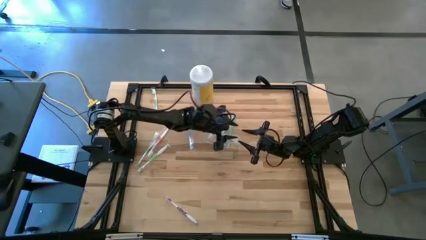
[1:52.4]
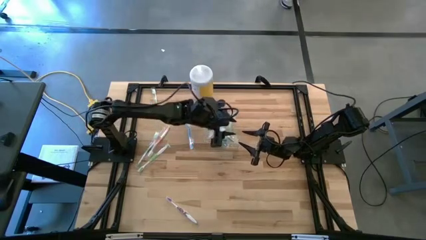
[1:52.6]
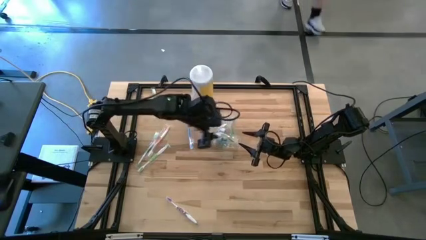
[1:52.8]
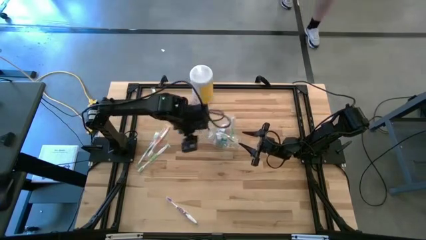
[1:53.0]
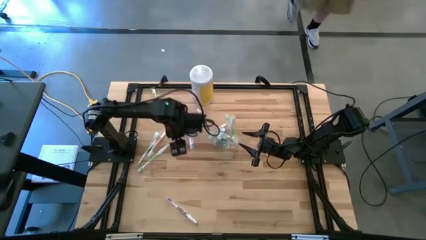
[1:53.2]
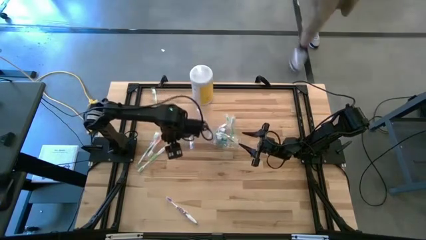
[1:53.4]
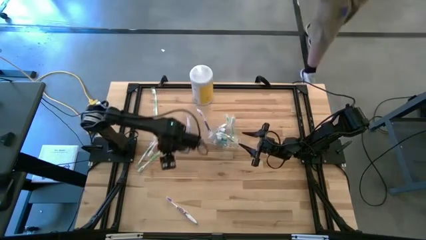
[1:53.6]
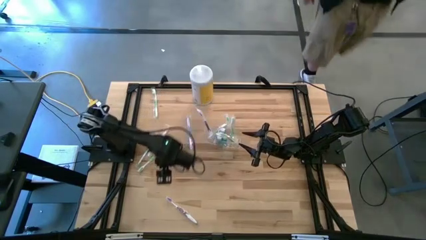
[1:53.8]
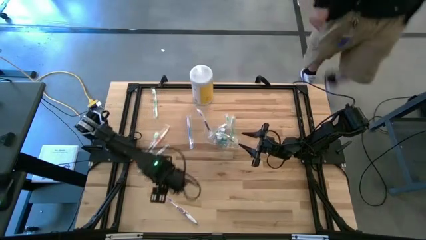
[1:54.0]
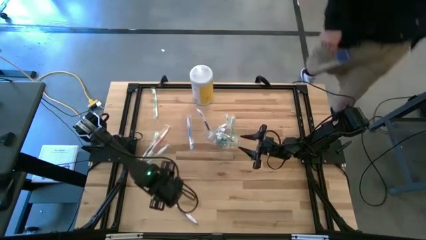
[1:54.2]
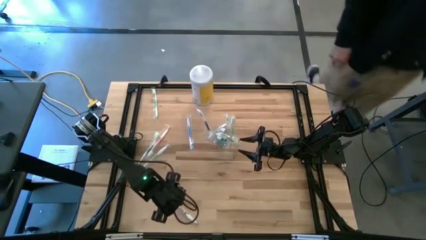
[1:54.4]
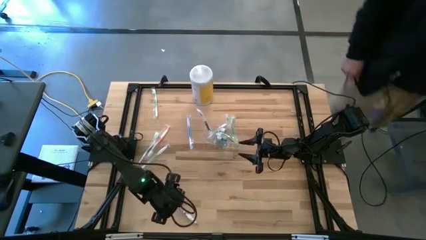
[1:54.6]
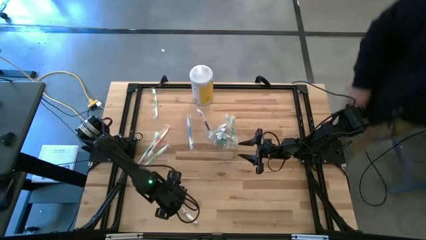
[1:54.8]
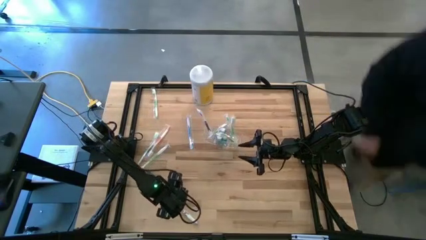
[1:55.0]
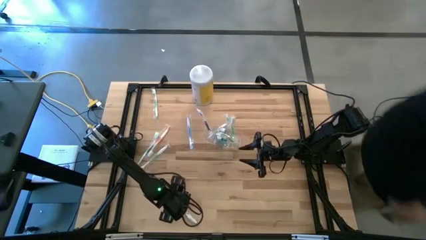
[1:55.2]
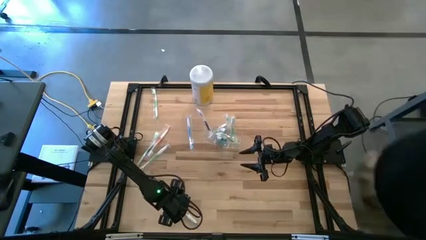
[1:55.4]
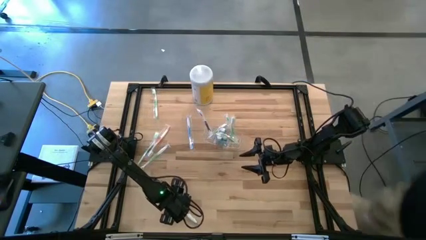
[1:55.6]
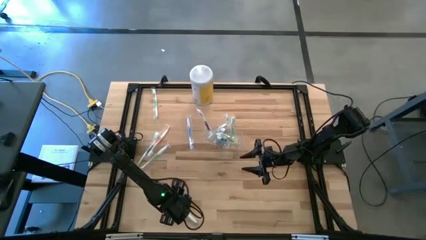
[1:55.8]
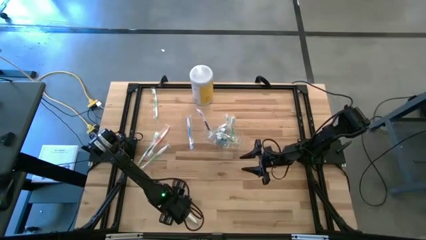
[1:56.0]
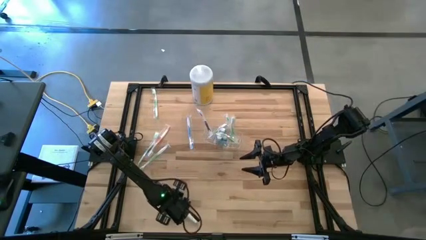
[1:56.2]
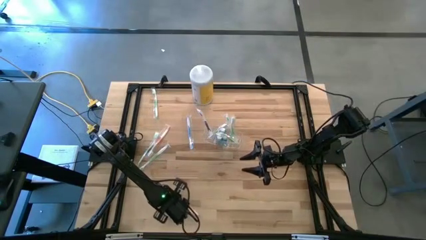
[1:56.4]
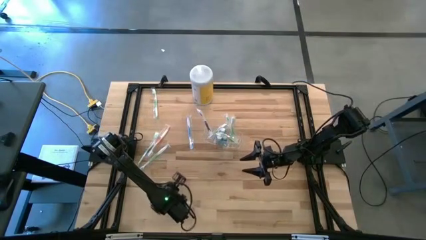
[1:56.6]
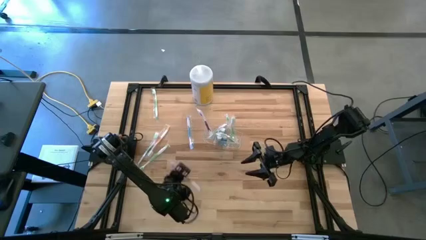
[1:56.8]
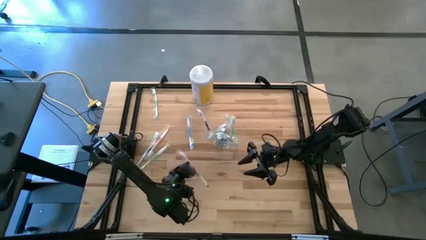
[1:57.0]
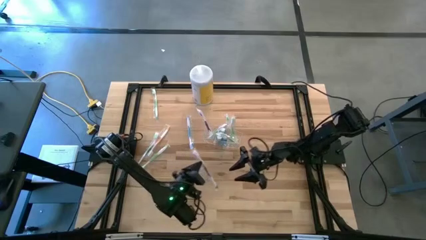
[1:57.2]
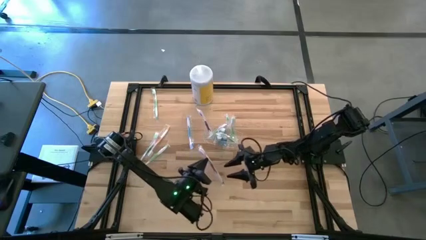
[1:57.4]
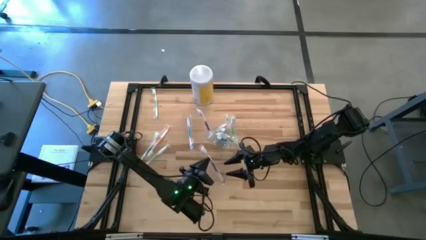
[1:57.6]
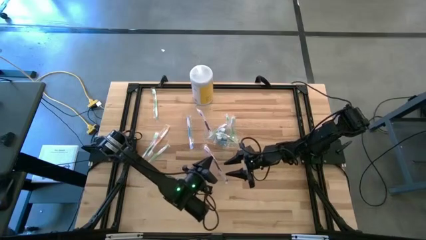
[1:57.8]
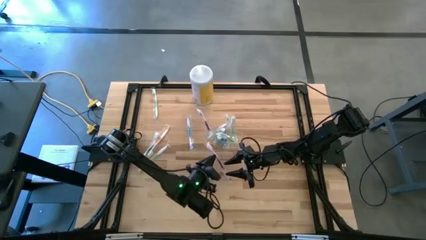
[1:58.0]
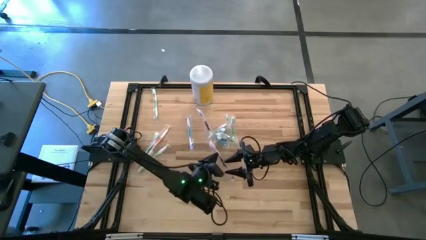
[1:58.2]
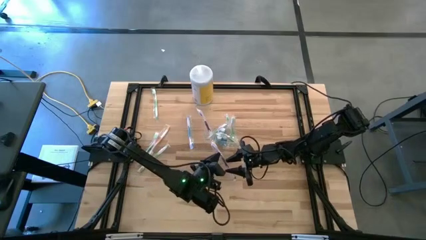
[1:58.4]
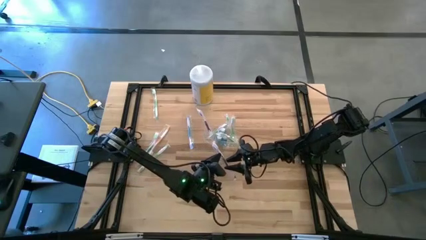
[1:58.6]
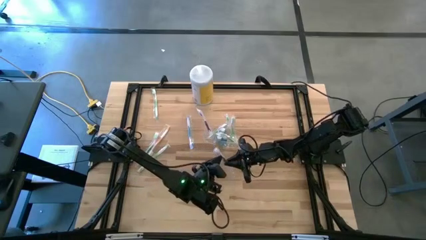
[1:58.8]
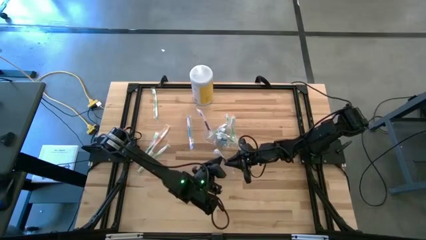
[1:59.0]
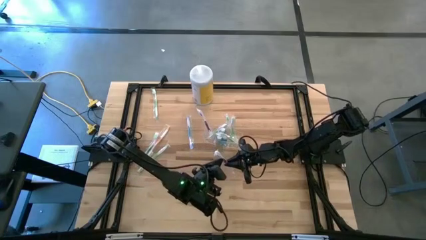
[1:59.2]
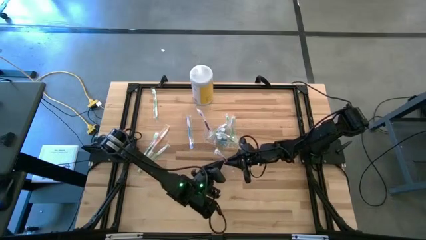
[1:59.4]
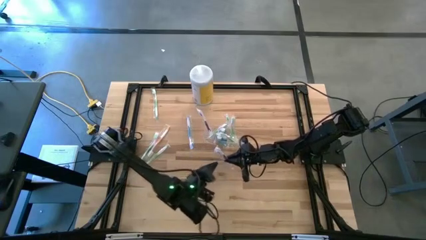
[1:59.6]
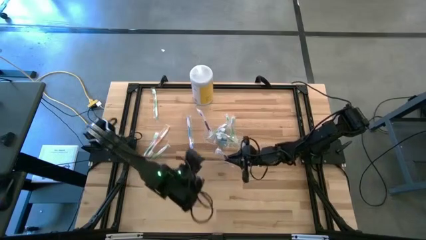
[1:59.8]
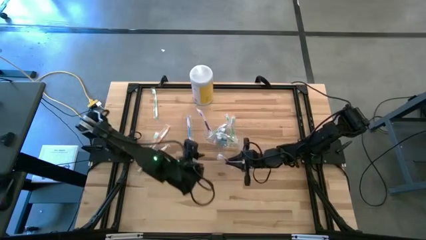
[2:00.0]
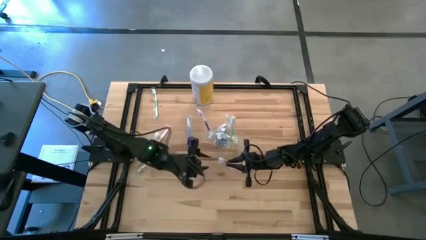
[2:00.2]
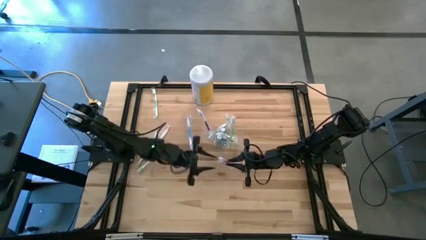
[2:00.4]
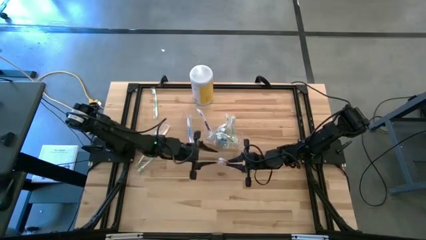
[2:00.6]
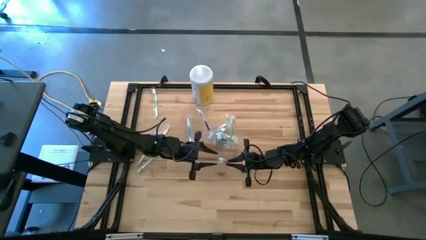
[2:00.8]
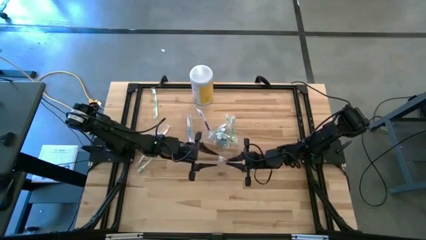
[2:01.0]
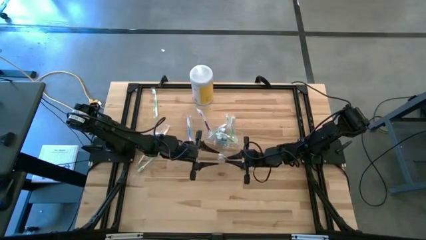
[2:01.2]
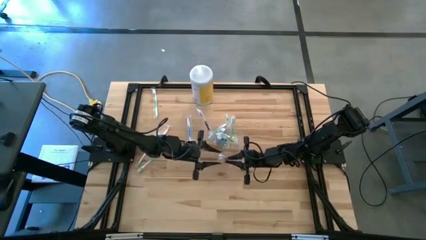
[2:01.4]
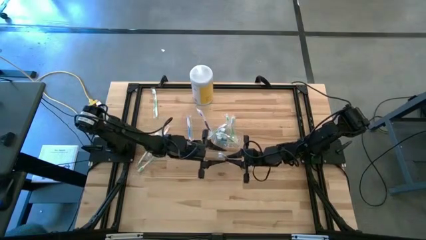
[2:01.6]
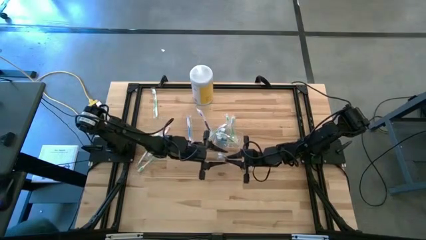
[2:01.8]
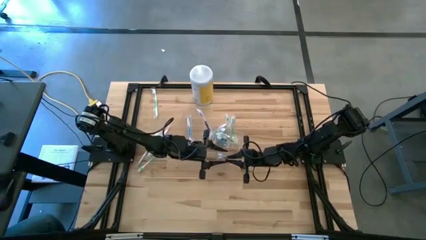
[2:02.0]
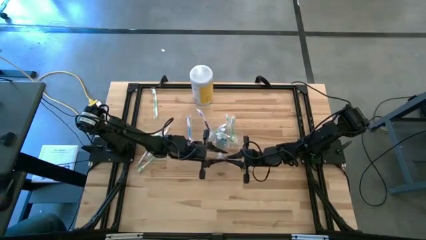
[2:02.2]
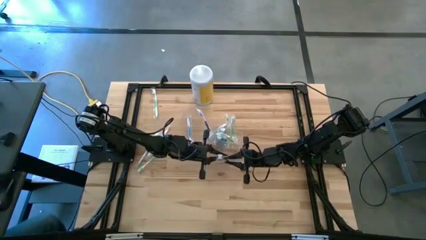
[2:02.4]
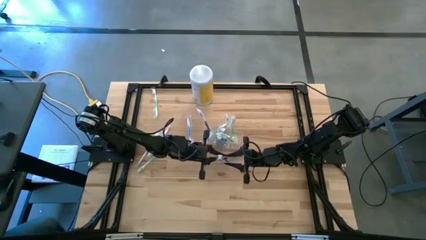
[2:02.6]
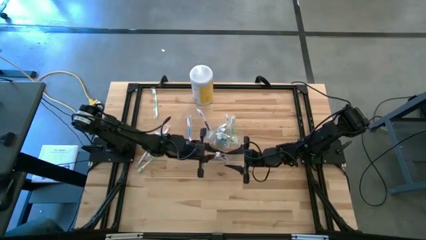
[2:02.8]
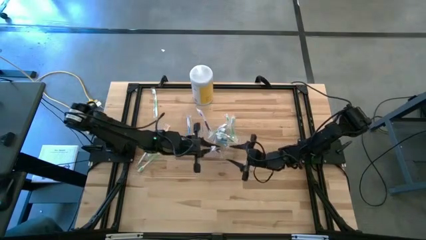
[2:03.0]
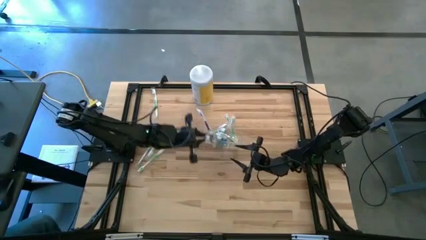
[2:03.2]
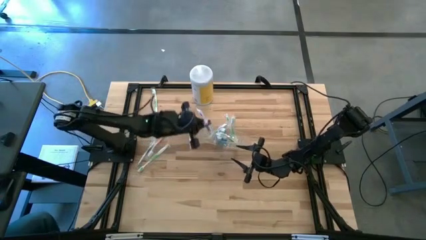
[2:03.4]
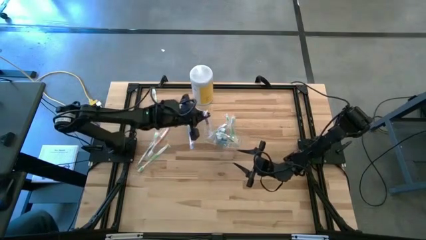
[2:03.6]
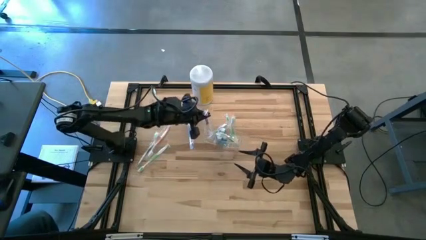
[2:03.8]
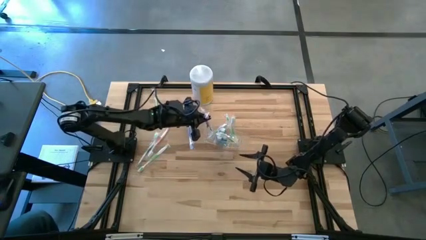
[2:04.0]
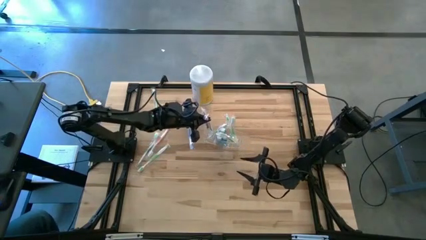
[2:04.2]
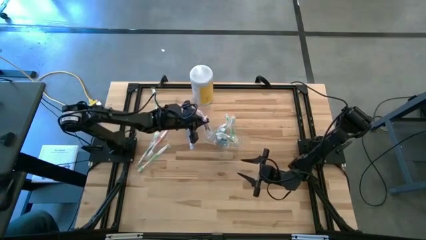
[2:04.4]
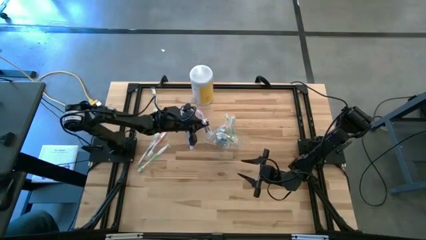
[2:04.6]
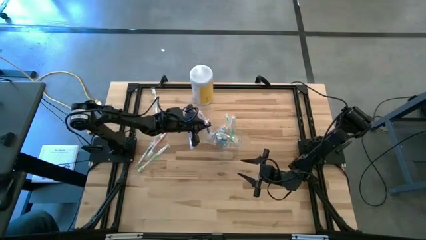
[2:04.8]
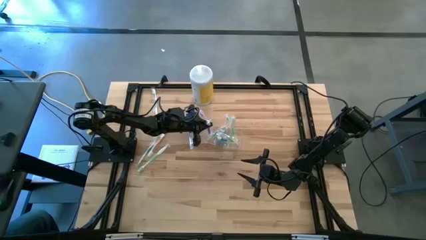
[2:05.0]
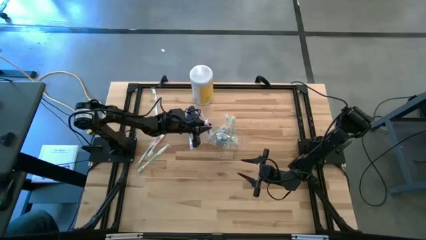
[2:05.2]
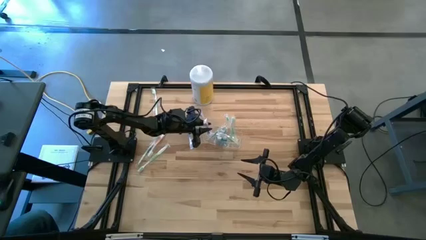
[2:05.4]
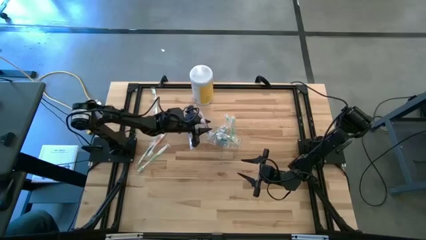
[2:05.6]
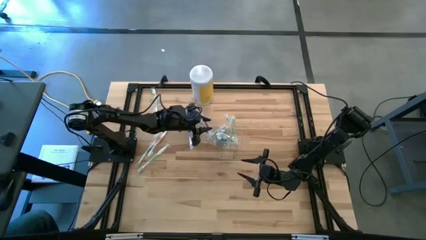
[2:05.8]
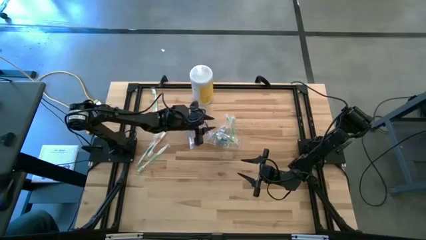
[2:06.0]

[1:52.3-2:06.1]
Task: Pick & Place toothbrushing station
Put the purple toothbrush into the left section of the transparent organizer
